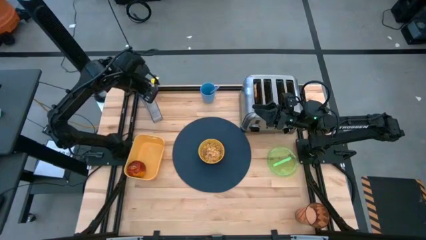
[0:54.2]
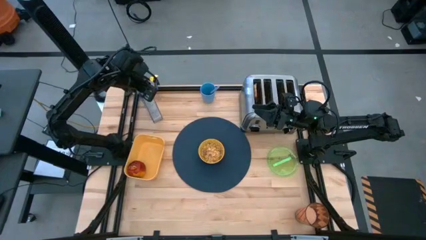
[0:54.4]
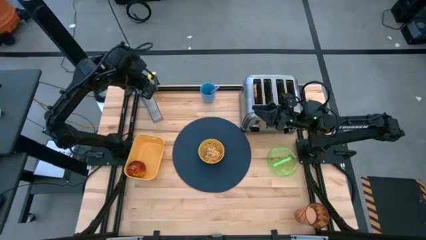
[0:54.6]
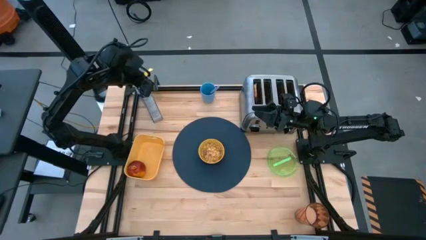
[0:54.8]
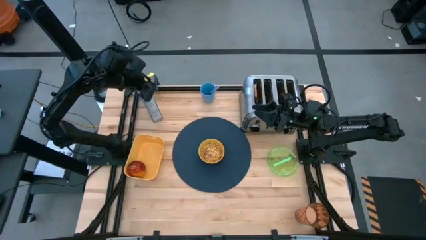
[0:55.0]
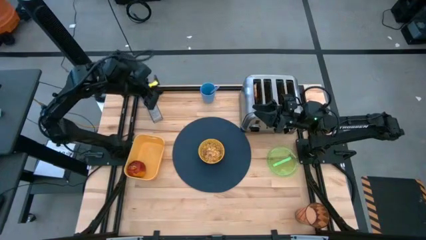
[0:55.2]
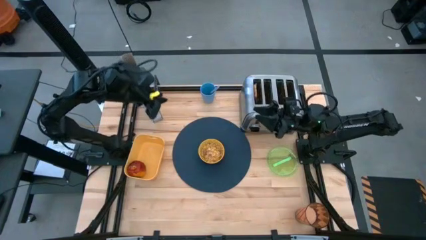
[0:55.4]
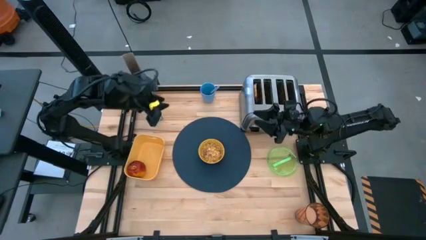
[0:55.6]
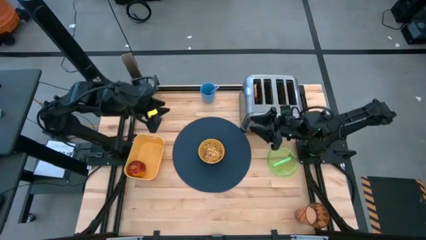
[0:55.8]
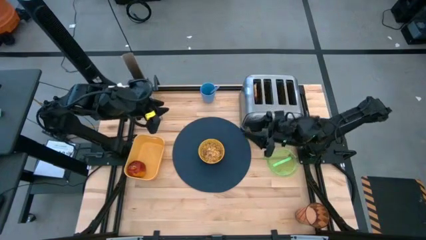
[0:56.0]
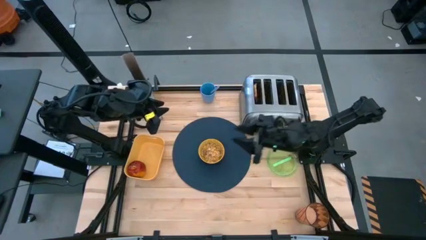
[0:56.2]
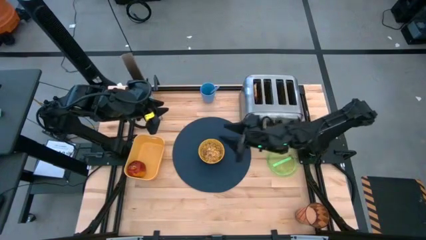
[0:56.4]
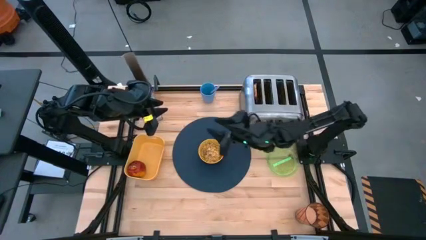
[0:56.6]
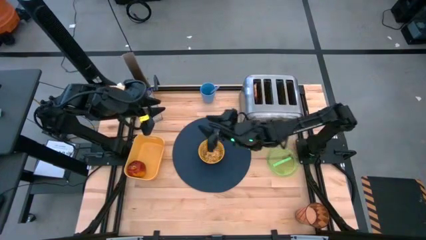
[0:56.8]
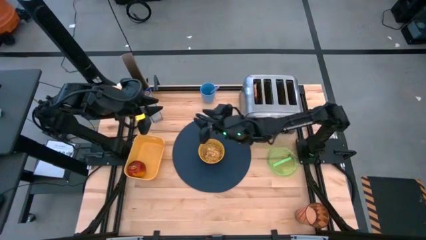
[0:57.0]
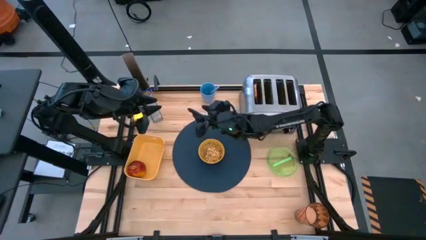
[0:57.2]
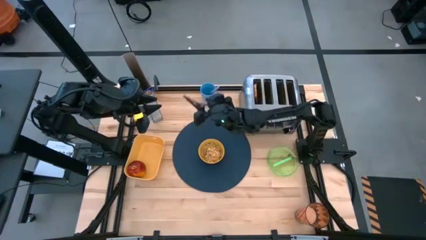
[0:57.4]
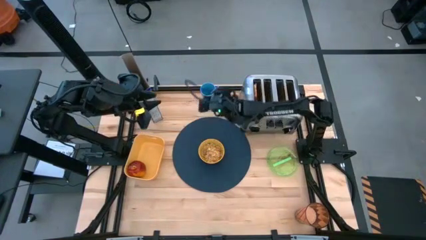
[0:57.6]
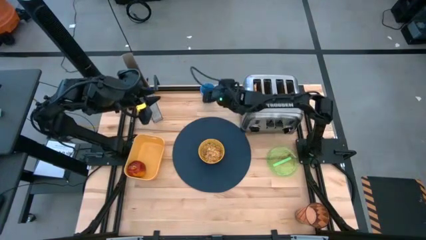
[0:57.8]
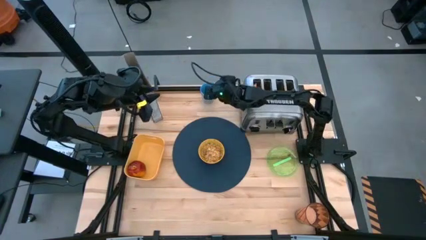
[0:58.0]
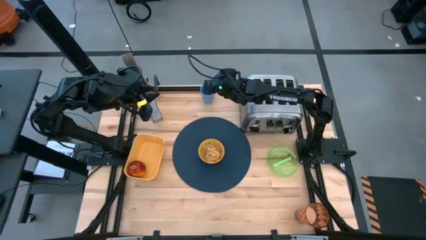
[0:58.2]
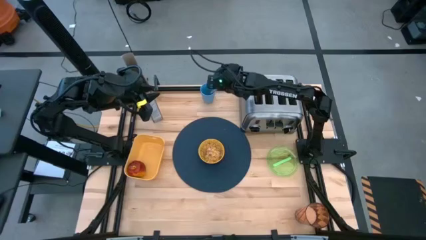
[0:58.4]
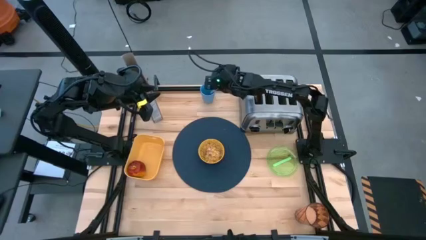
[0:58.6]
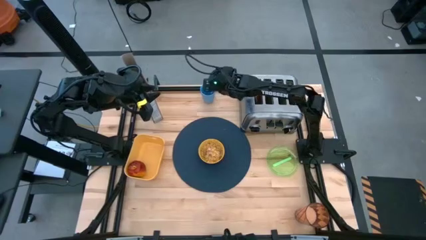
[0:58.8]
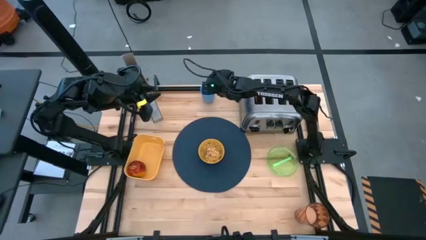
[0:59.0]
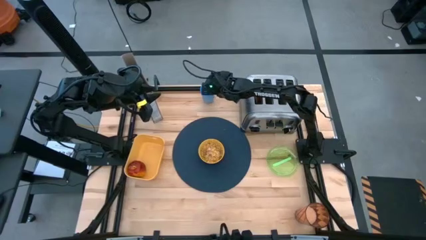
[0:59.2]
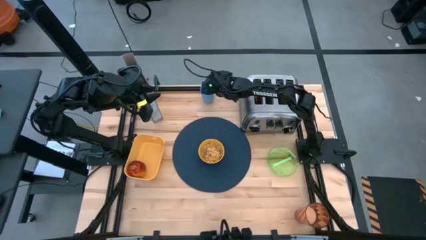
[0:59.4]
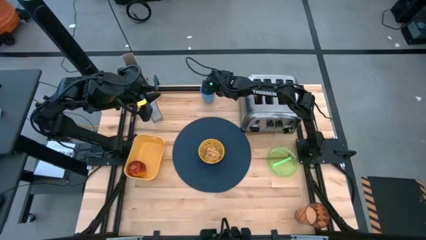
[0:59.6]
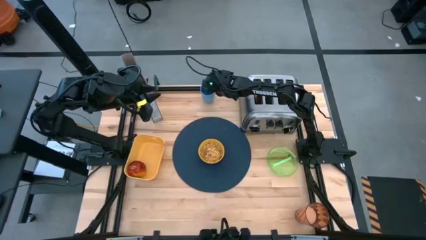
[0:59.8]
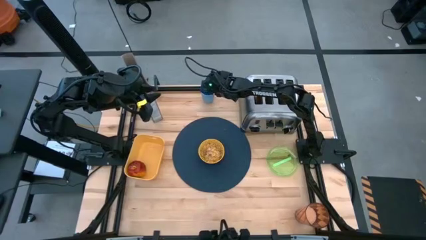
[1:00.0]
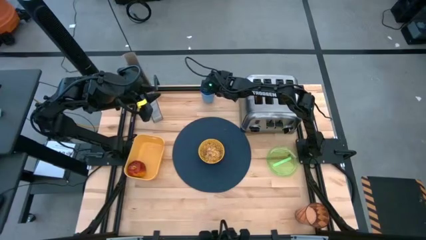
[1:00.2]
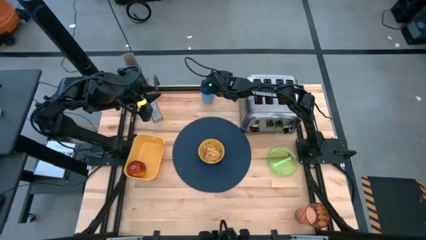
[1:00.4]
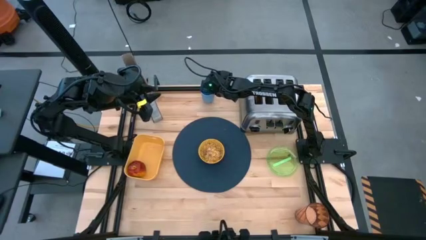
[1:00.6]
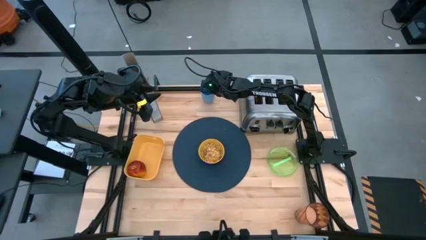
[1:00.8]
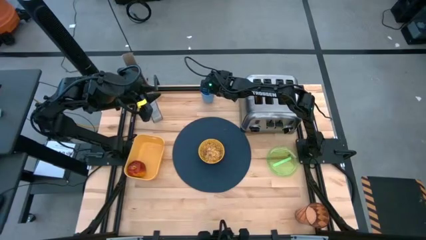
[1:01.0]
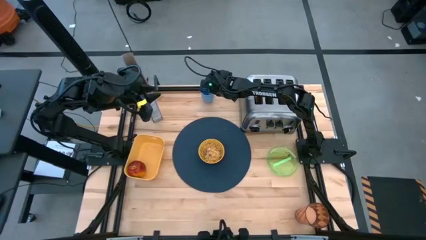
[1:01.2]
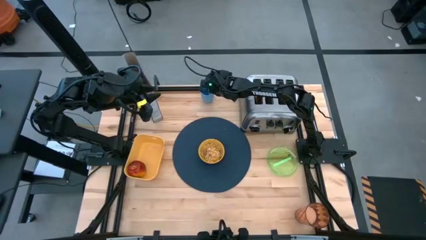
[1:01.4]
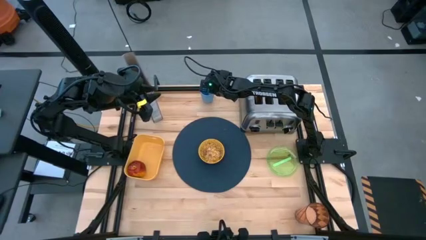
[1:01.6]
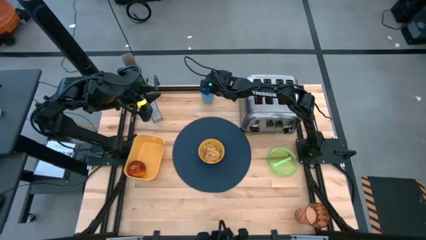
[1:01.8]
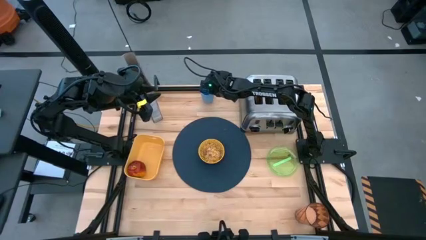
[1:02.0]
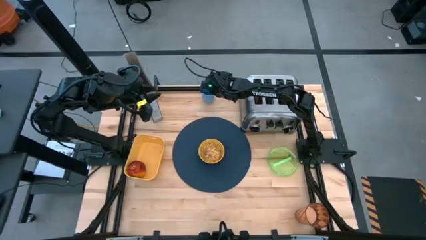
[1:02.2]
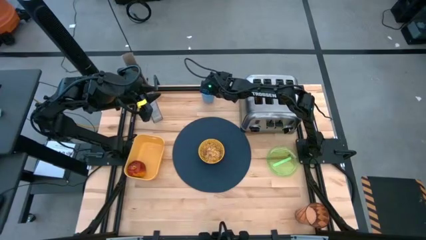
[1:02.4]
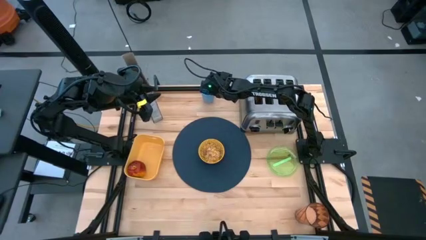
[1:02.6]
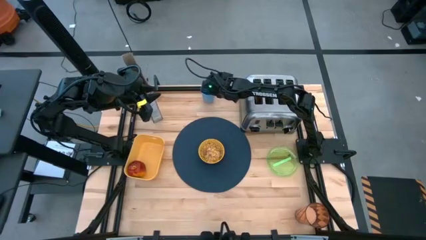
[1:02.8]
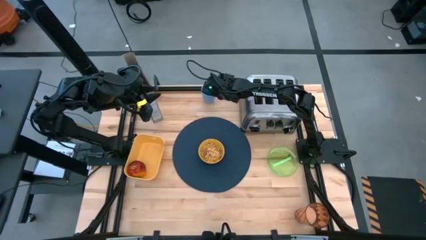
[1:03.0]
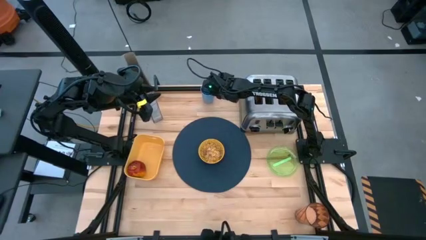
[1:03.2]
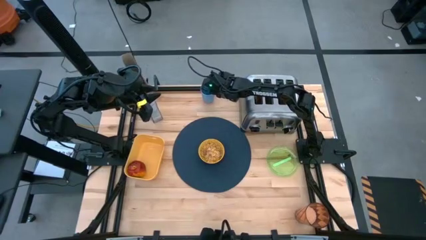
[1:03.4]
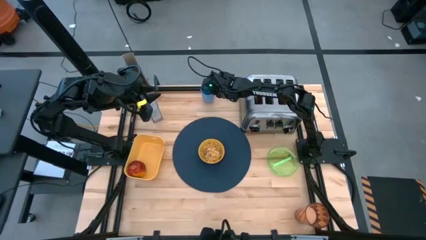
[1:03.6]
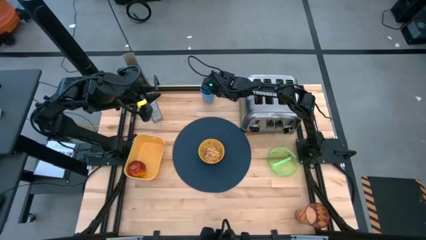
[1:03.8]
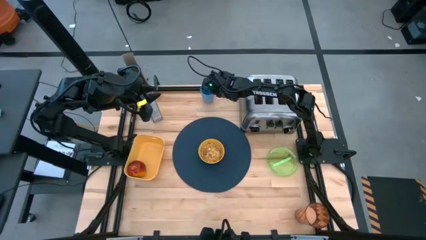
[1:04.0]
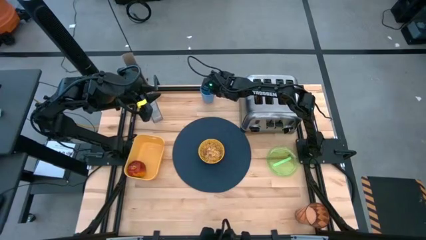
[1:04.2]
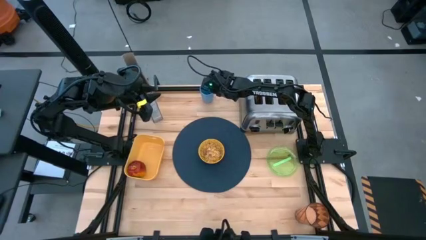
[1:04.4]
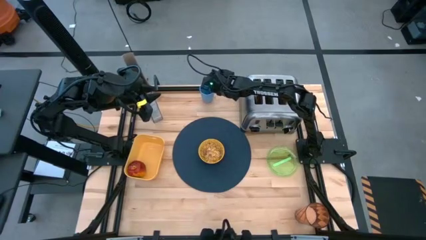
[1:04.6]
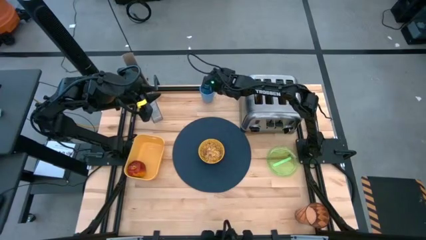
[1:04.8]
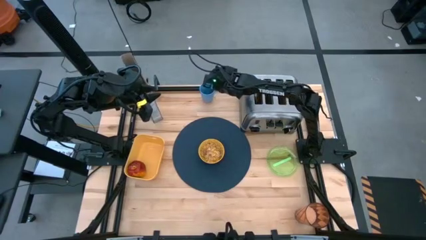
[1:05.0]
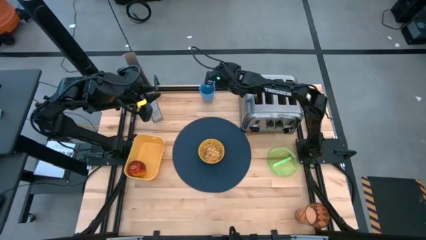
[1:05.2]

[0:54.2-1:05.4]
Task: Arrange a breakfast setting
Put the spoon on the mat to the right of the bowl

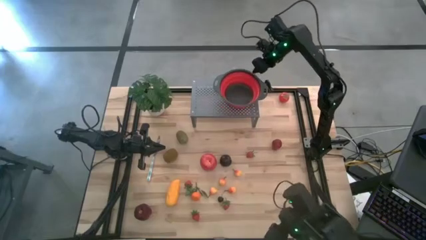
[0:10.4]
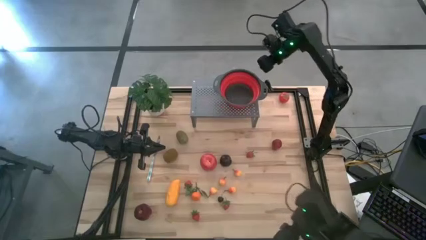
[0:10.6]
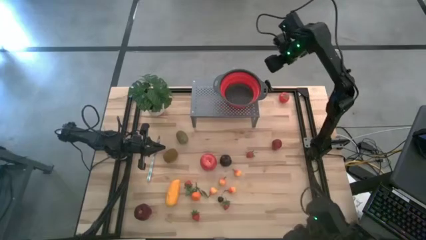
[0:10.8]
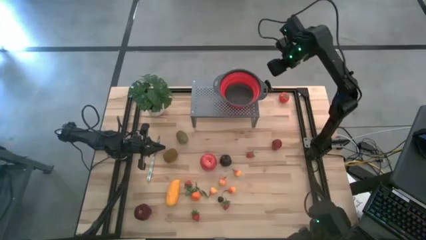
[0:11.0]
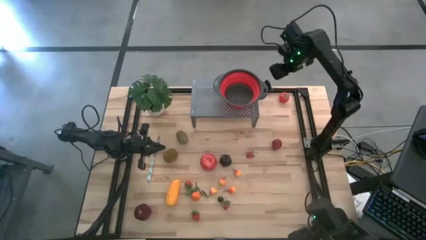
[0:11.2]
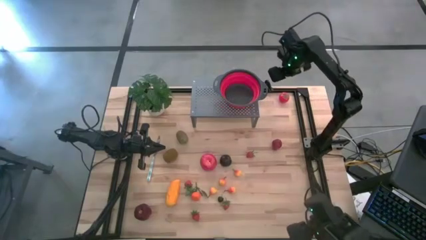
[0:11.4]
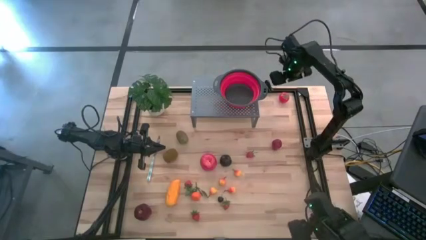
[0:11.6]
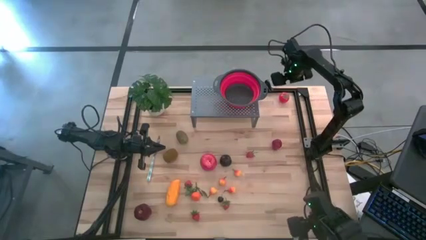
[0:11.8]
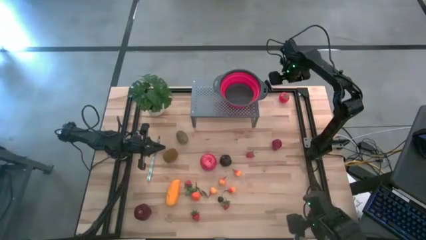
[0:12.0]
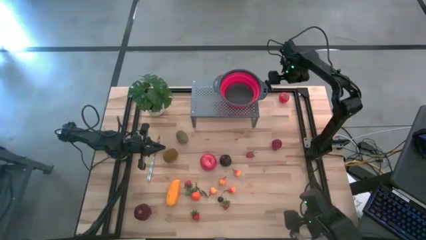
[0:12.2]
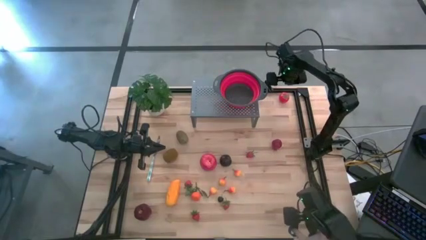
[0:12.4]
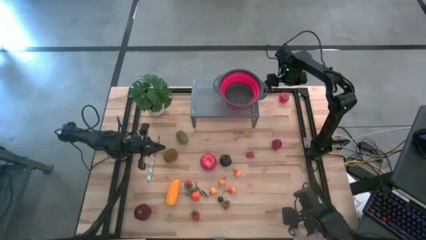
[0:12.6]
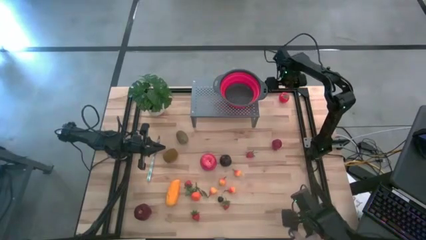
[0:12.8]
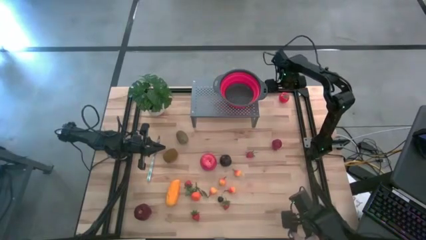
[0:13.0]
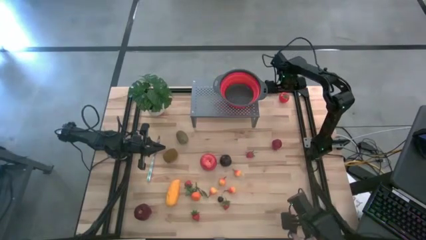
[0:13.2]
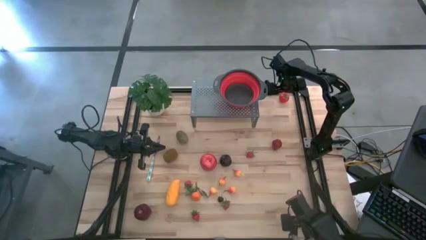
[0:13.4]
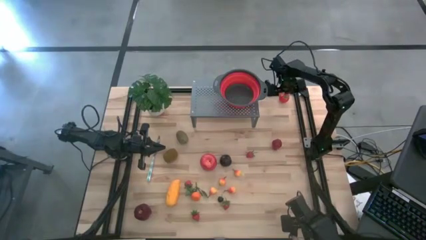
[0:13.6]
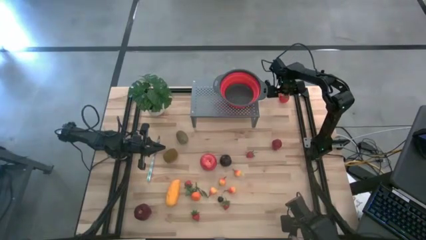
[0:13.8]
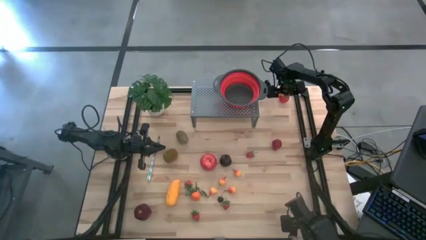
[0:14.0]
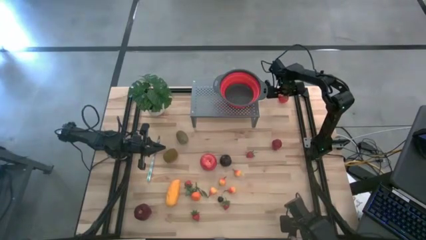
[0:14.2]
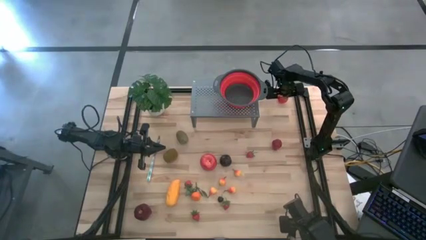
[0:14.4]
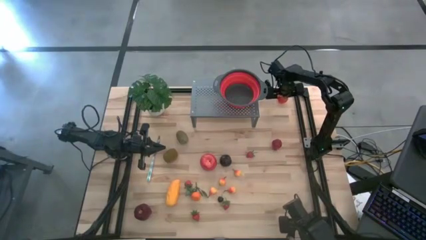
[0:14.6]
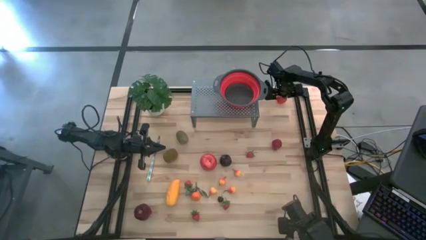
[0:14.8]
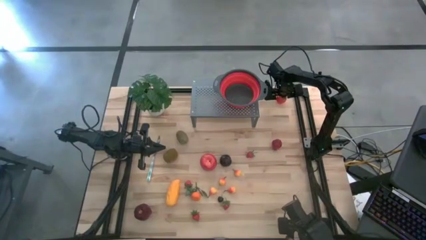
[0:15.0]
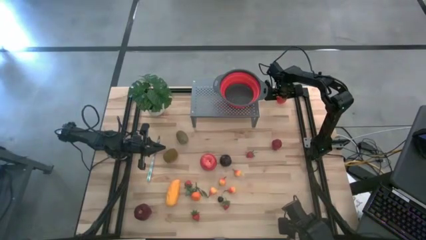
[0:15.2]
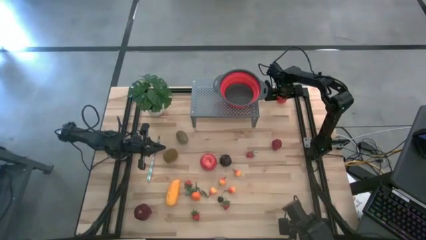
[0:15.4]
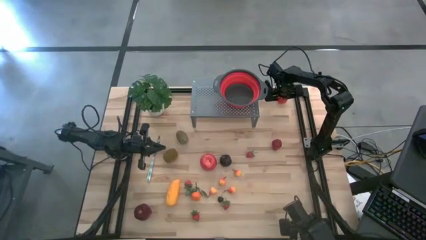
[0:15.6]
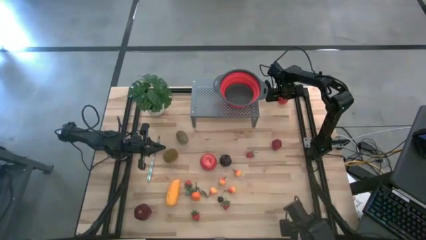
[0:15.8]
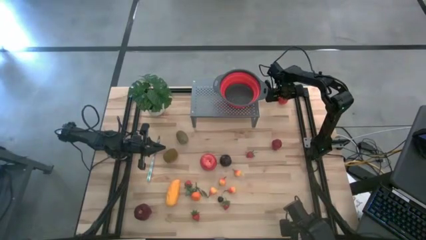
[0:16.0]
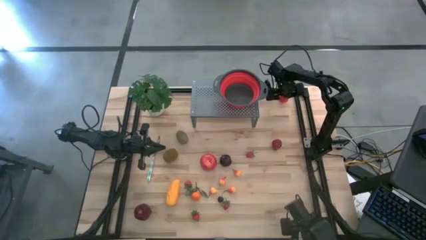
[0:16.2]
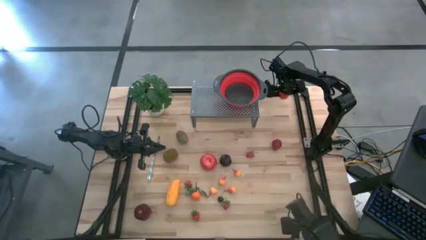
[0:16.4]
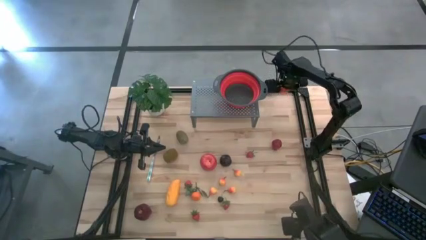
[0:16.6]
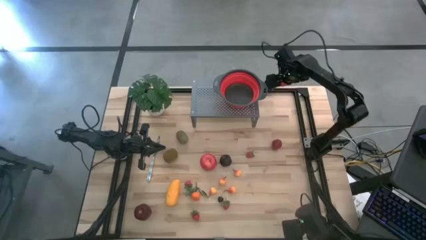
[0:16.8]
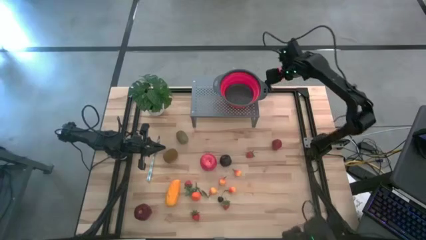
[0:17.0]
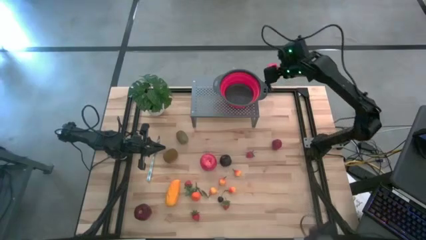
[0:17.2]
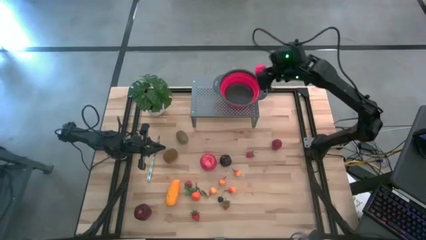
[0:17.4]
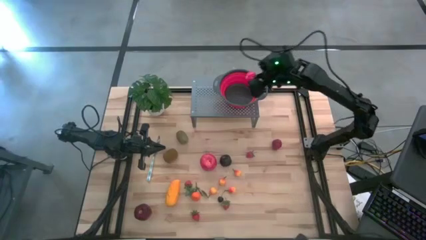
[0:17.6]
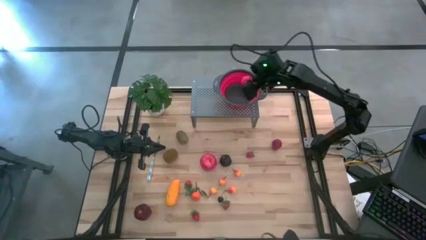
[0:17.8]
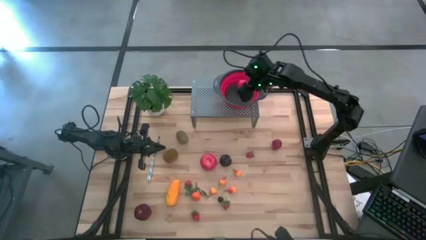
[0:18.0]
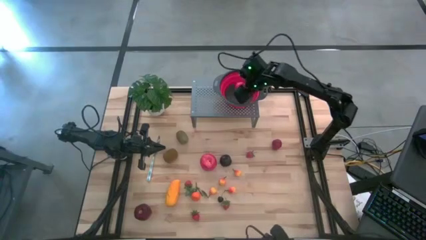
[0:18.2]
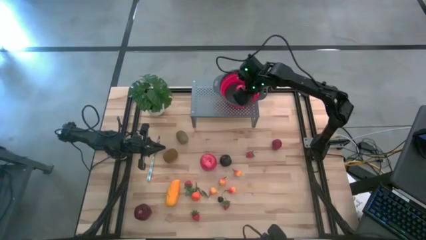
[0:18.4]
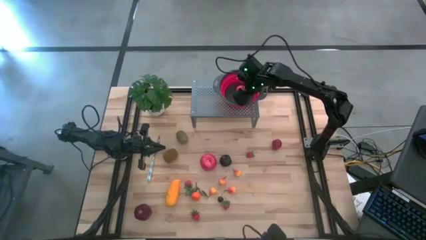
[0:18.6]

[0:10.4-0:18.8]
Task: Pick & Place Fruit
Put the tomato into the strainer bowl on the shelf
